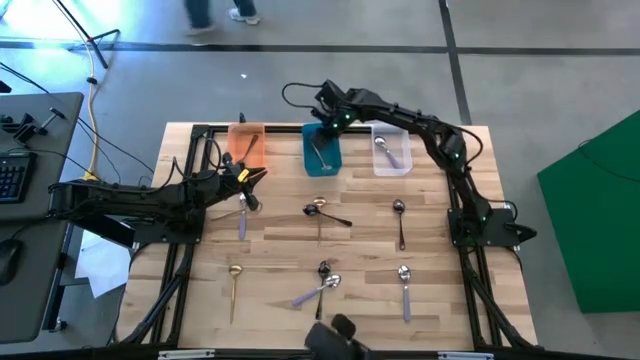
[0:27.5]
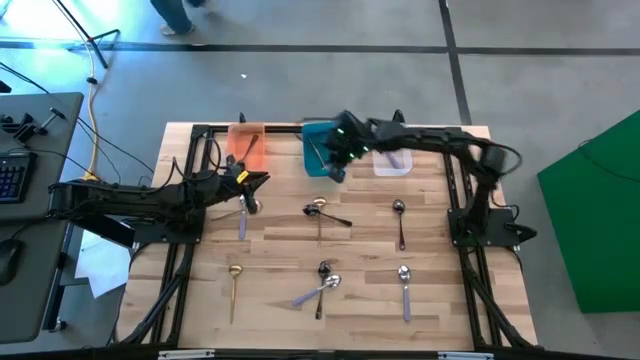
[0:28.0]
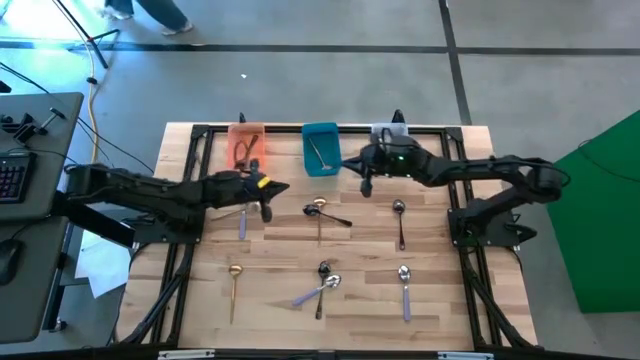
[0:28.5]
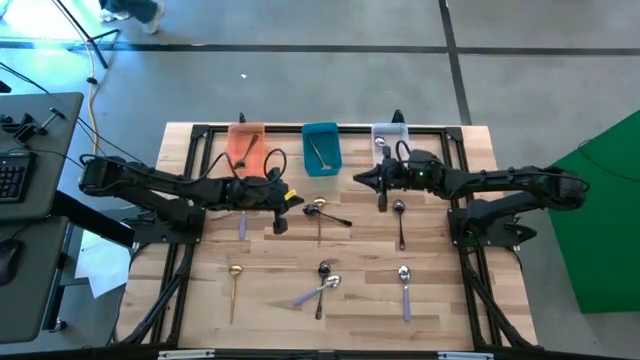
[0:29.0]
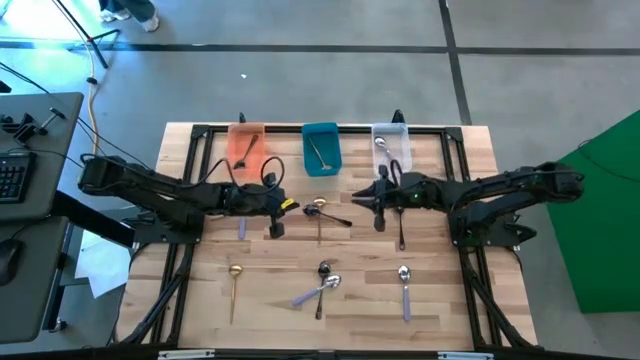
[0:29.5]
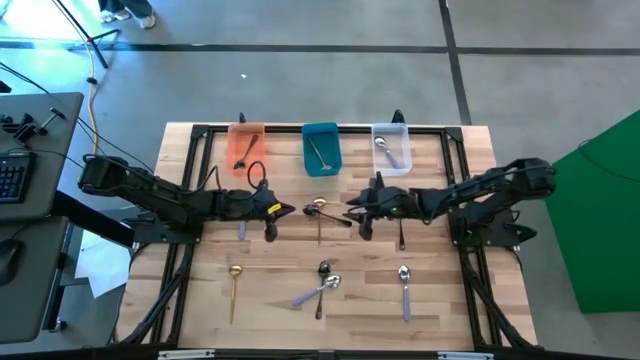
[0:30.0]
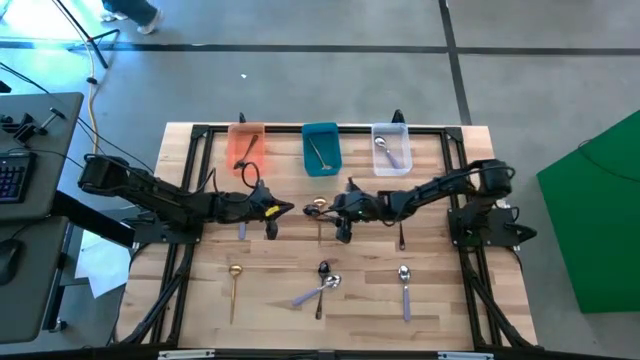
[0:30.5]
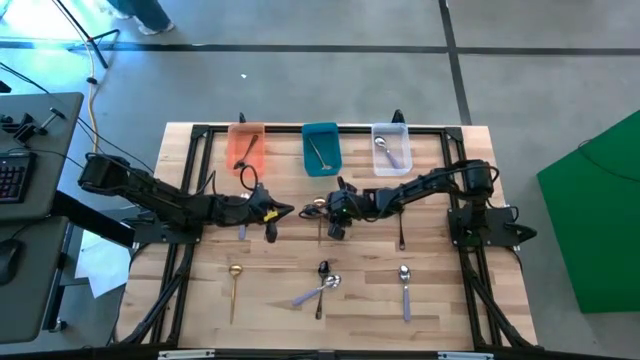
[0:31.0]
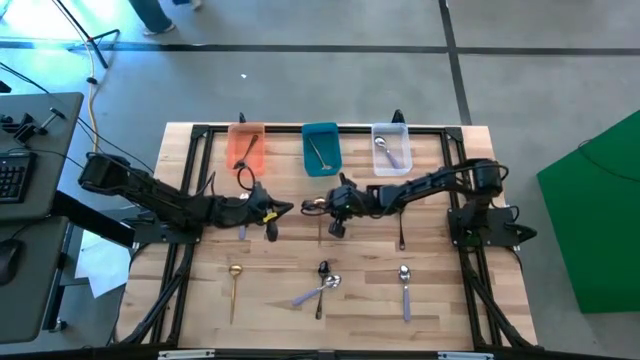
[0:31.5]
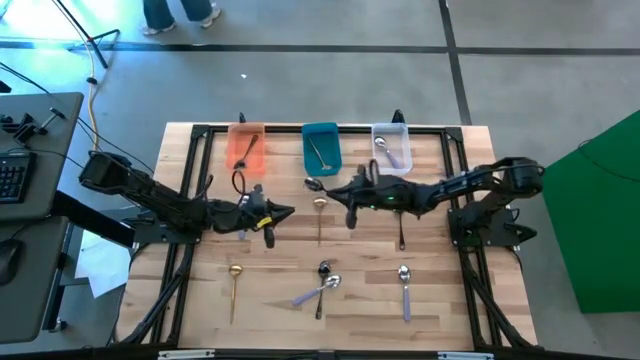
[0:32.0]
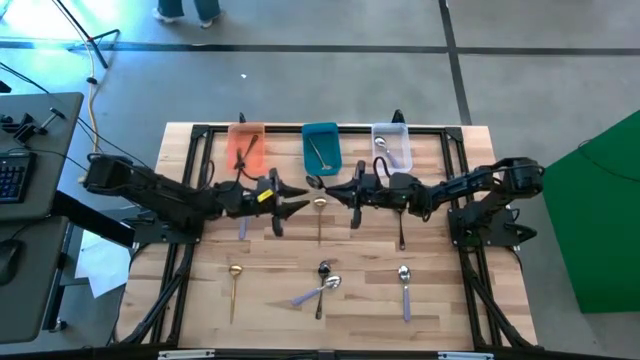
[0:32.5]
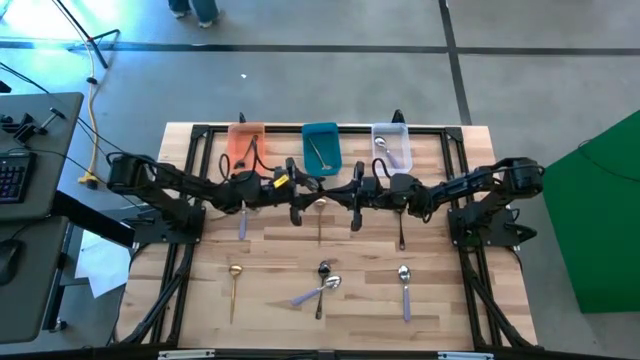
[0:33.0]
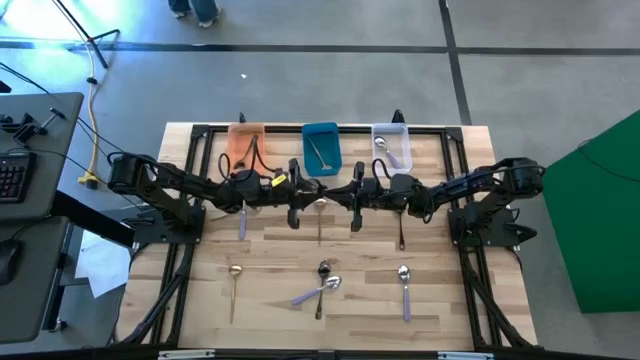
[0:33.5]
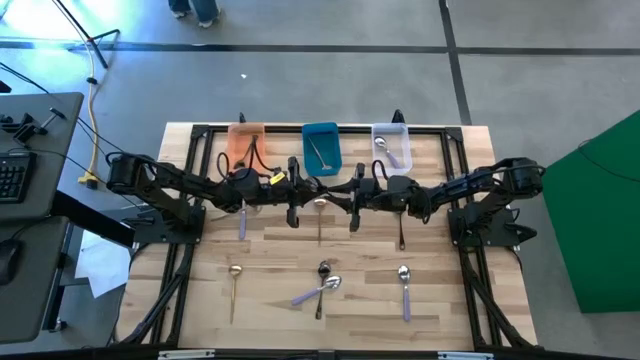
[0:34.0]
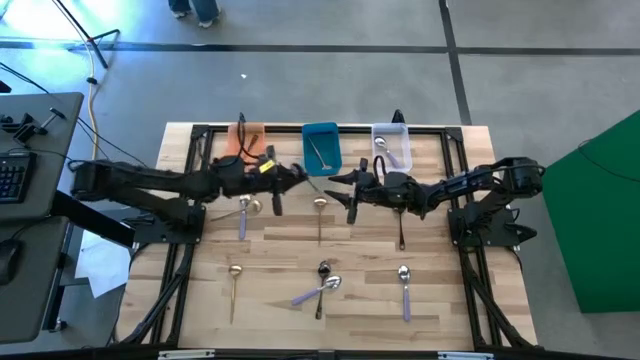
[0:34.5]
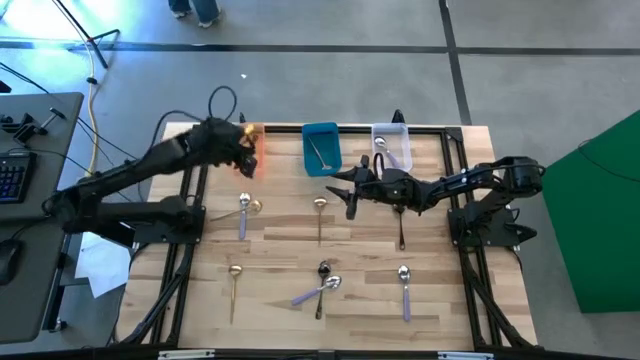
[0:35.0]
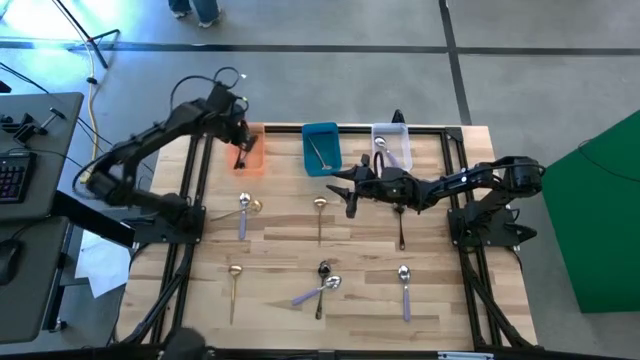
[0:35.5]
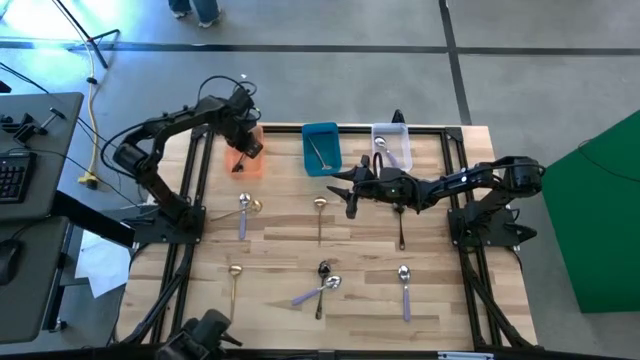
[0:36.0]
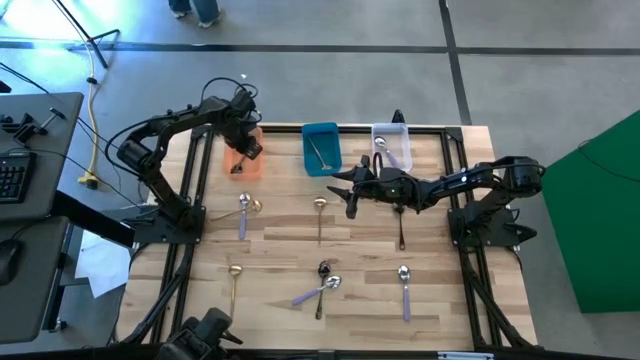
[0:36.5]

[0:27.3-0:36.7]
Task: Sort silverware by color (type)
Put the top left black spoon into the orange bin

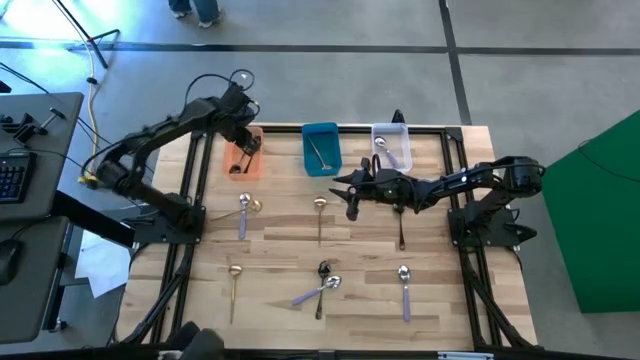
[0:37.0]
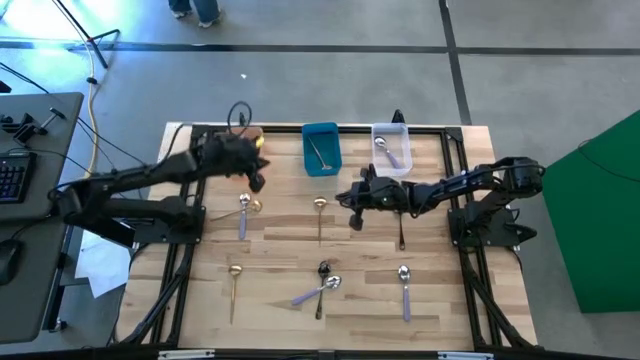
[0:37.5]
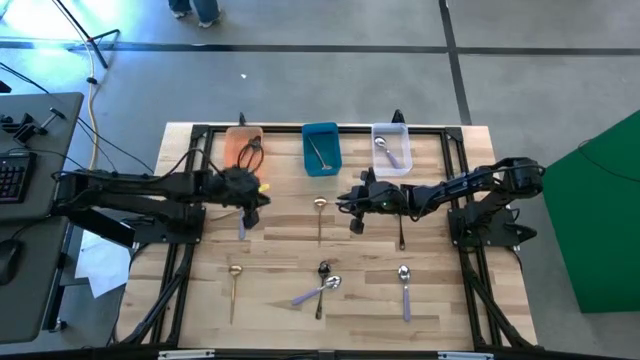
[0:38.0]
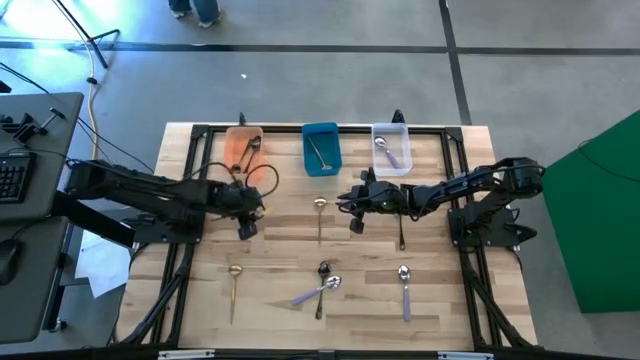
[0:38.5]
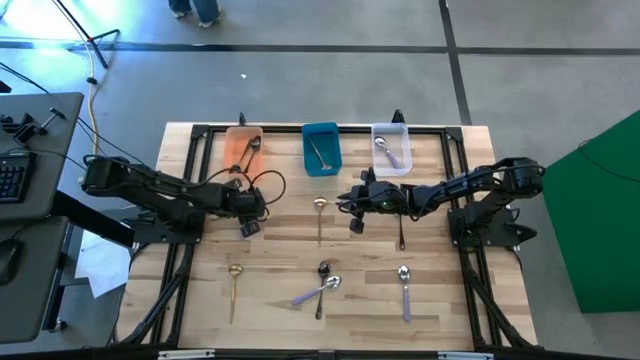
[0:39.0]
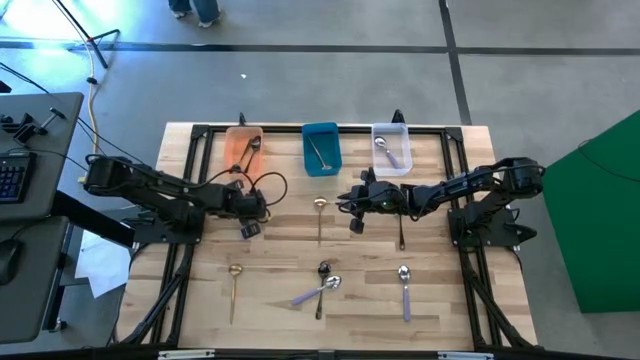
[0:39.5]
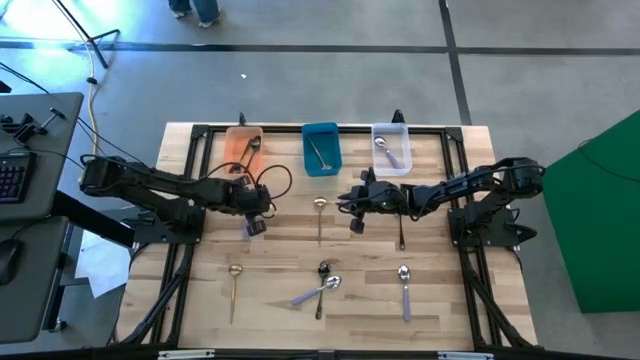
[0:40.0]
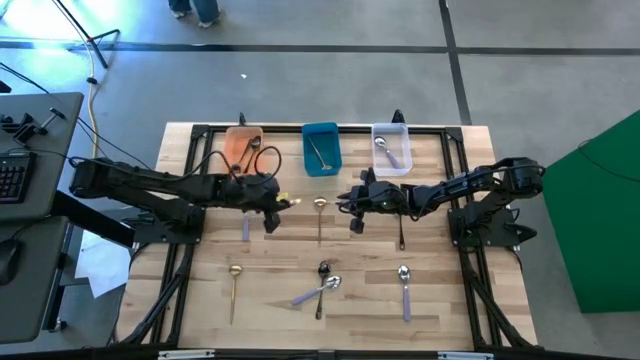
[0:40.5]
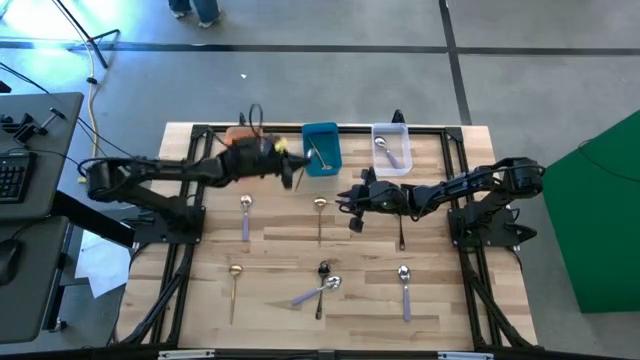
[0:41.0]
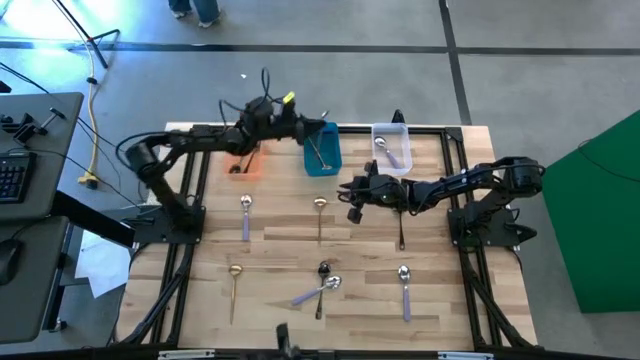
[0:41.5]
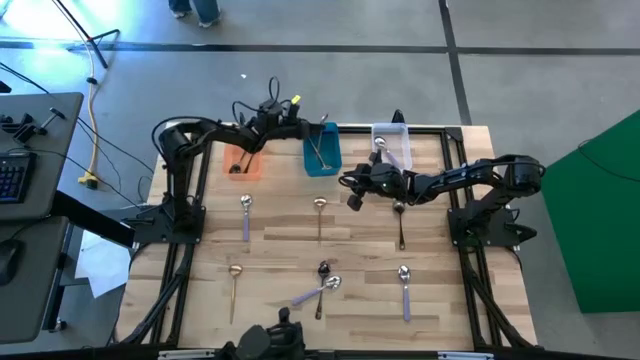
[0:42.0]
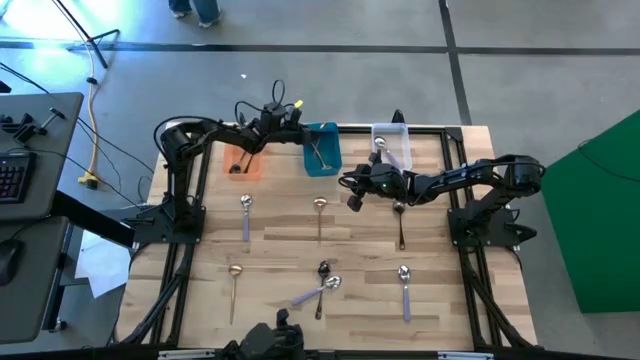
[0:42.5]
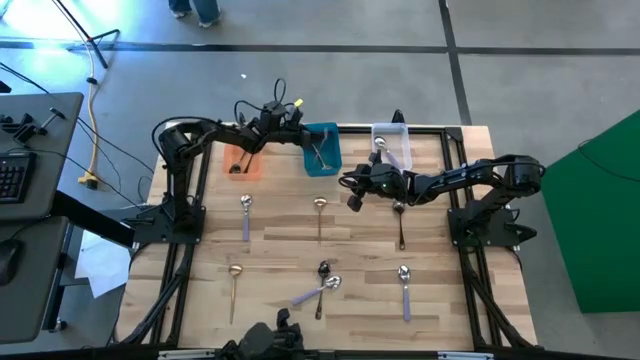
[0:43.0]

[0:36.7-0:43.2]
Put the top left gold spoon into the blue bin

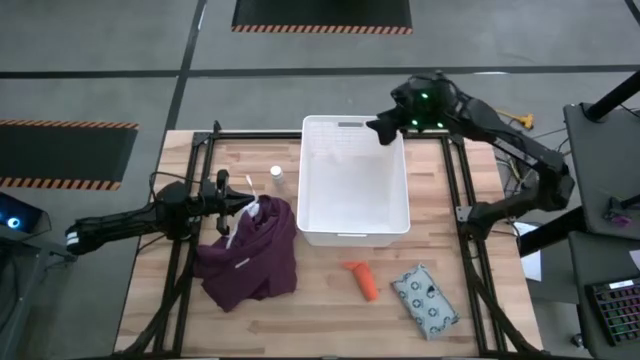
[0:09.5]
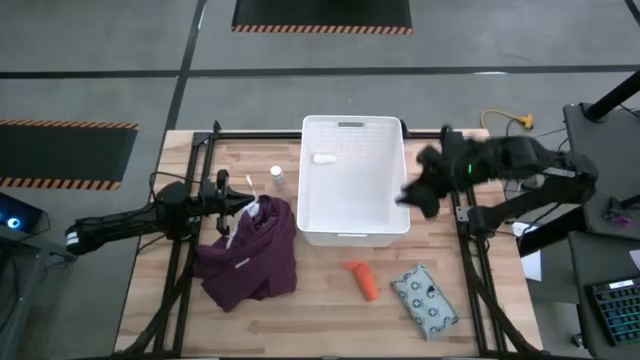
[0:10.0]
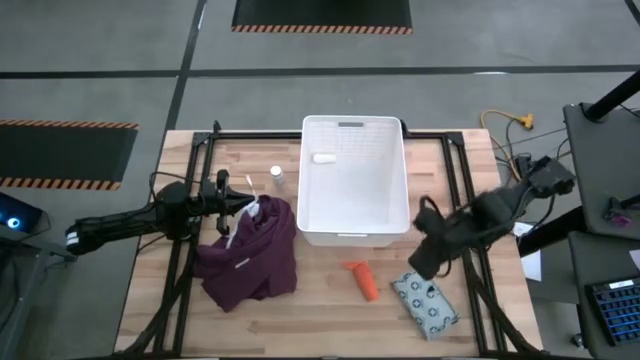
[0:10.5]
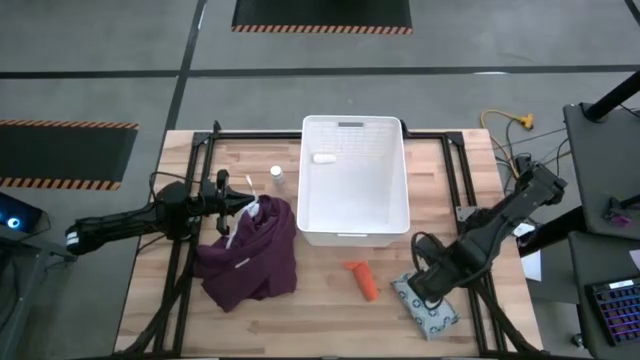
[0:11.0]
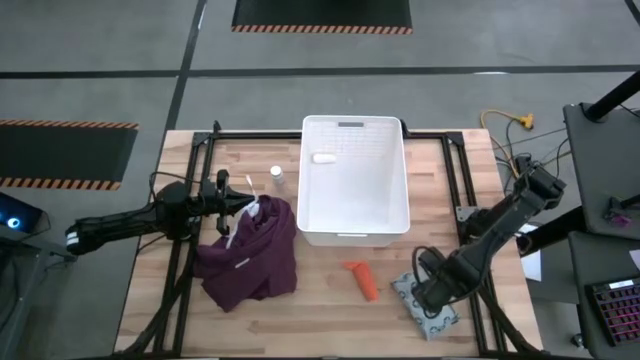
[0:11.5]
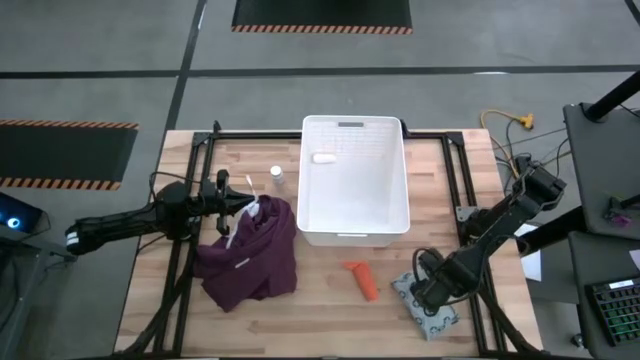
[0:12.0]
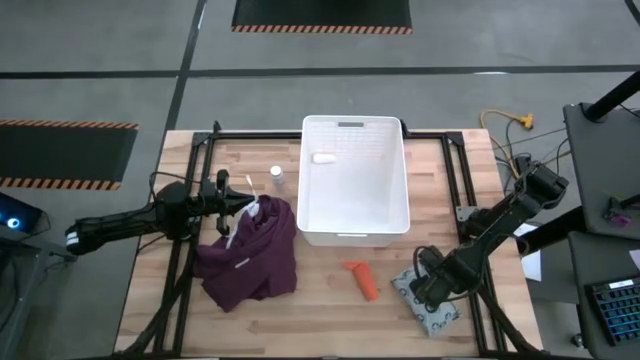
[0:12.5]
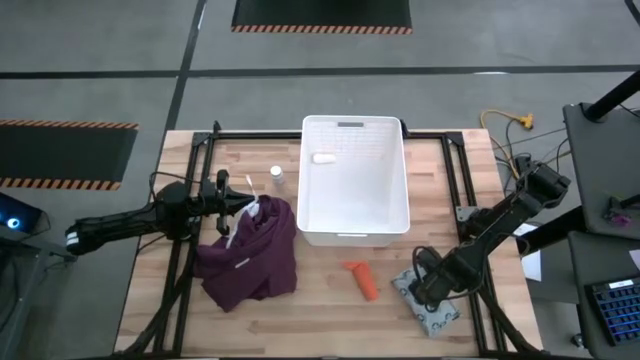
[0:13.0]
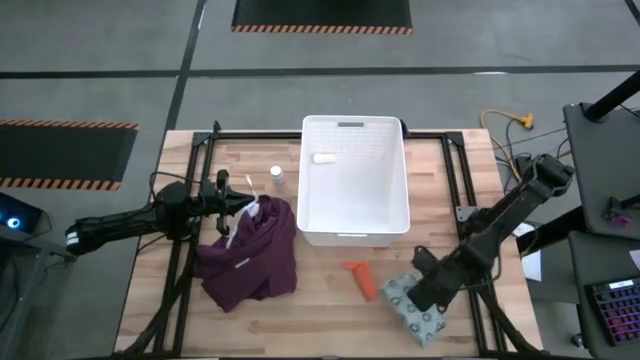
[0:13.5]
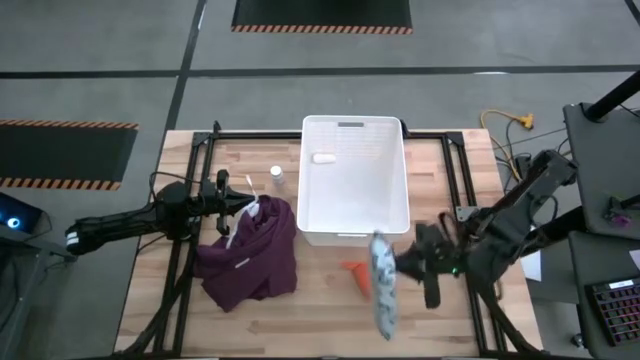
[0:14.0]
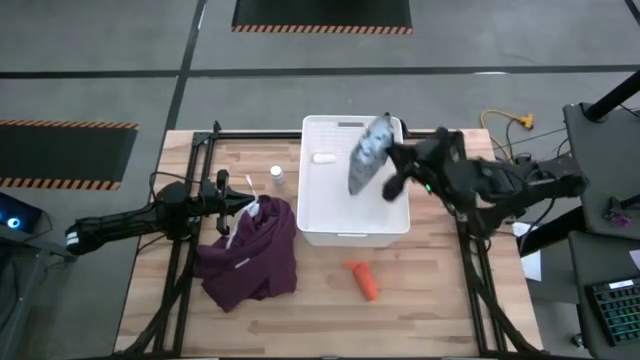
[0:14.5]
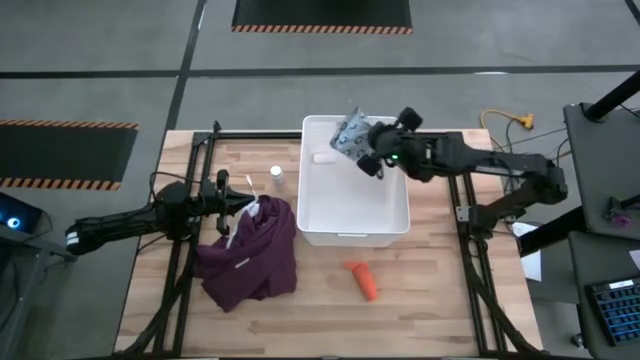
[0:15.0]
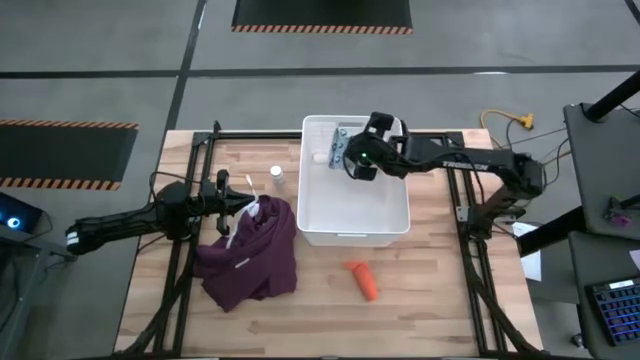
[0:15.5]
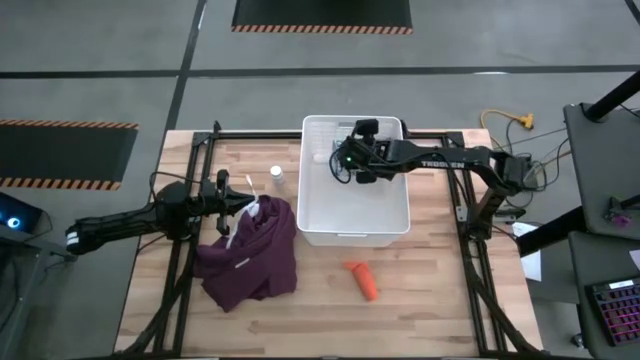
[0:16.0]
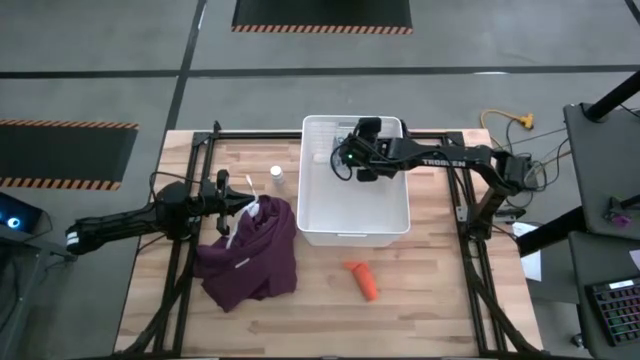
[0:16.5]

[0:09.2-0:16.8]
Task: Pick & place medical supplies in basket/bin
Put the white mailer bag into the white bin
